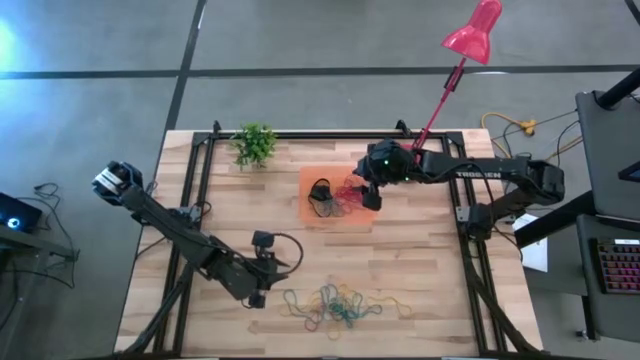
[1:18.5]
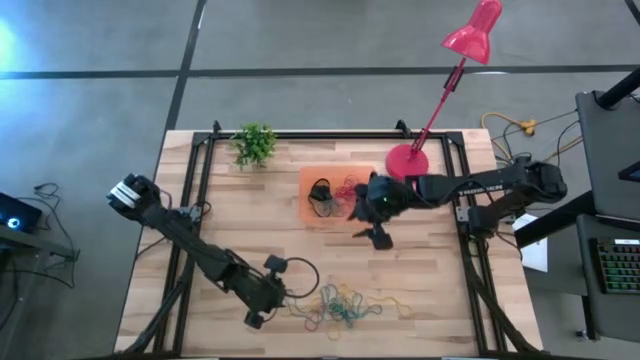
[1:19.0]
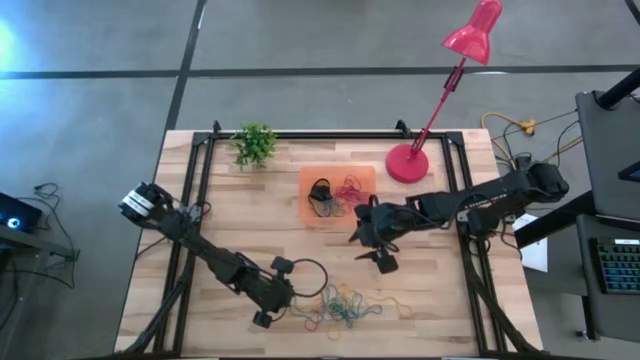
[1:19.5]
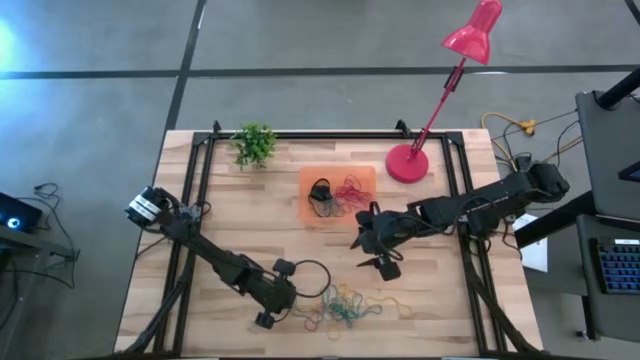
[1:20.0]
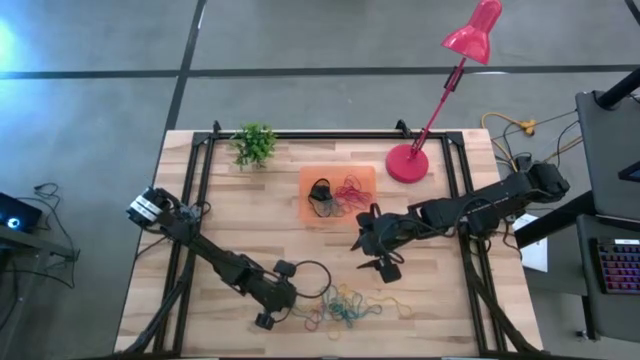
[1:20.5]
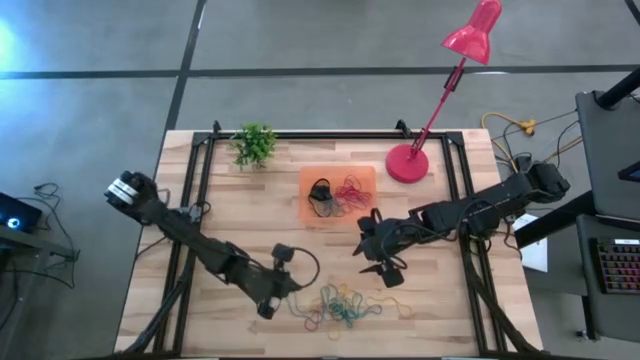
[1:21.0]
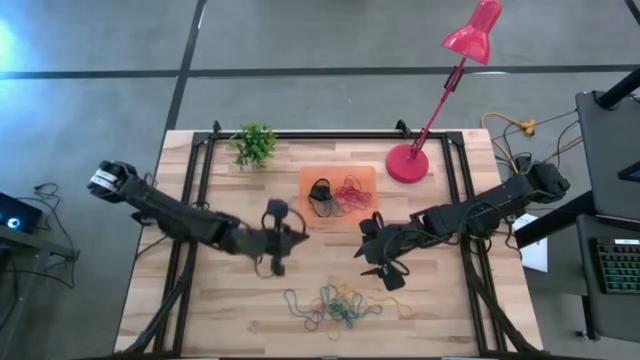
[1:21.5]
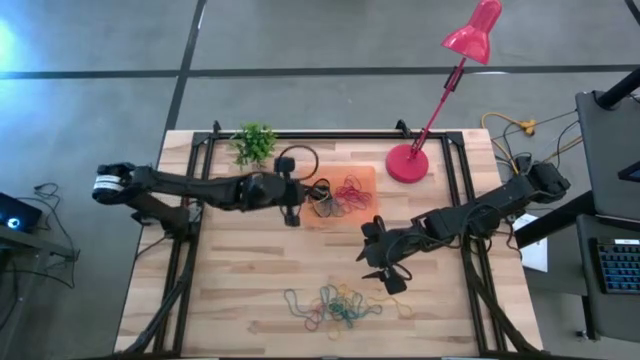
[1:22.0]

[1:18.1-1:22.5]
Task: Pick and place rubber bands into bin
Put the yellow rubber band into the bin

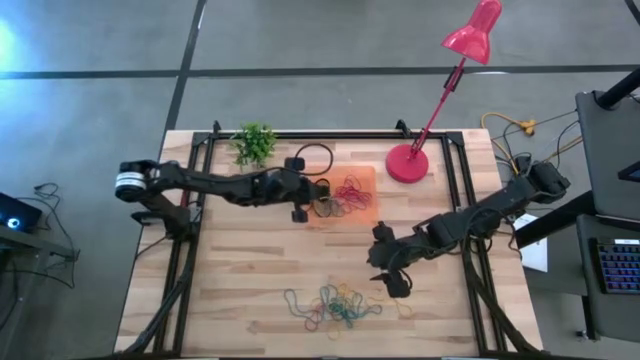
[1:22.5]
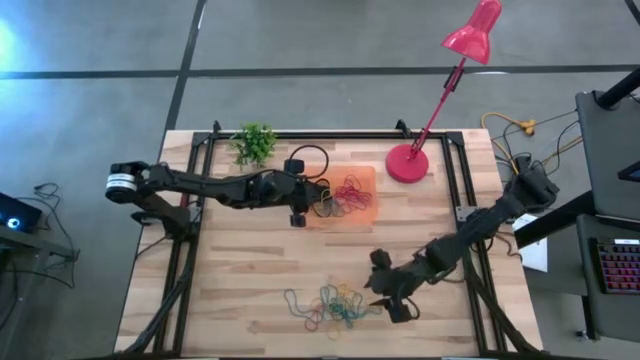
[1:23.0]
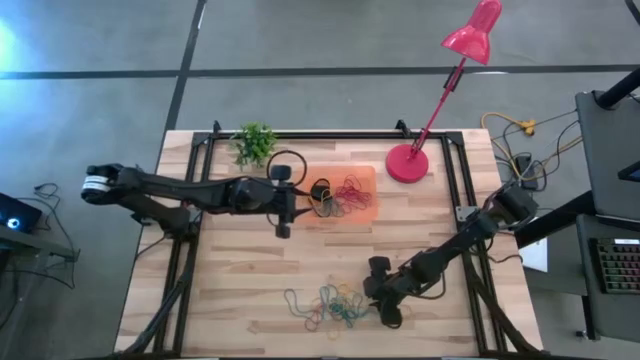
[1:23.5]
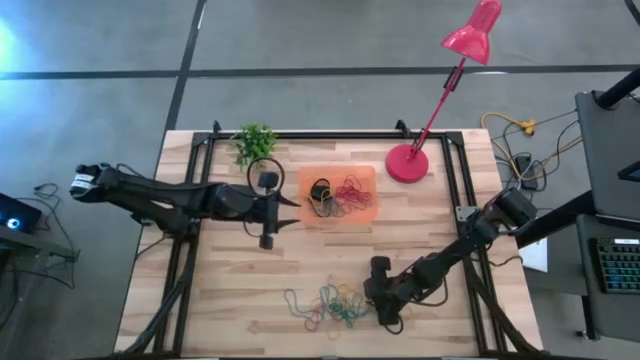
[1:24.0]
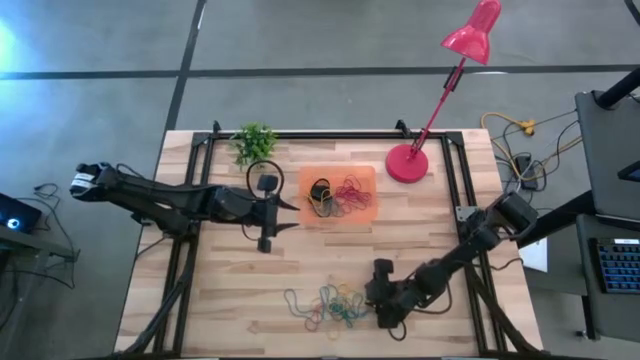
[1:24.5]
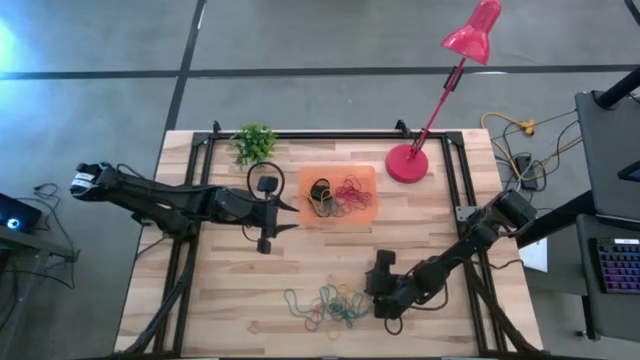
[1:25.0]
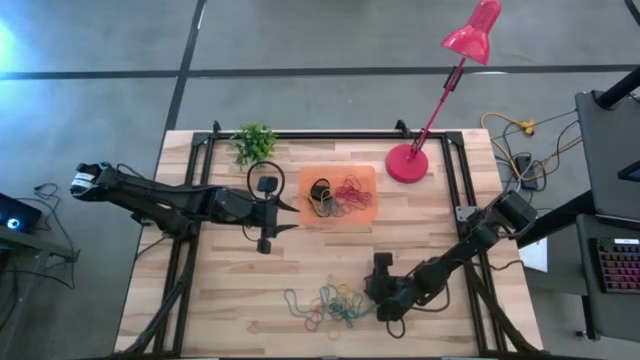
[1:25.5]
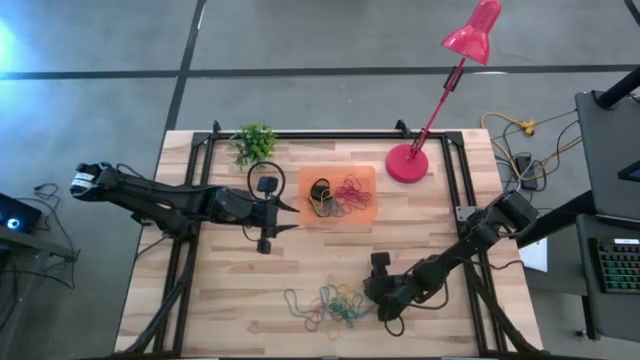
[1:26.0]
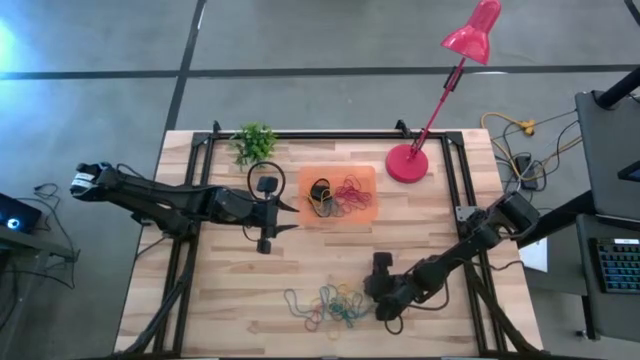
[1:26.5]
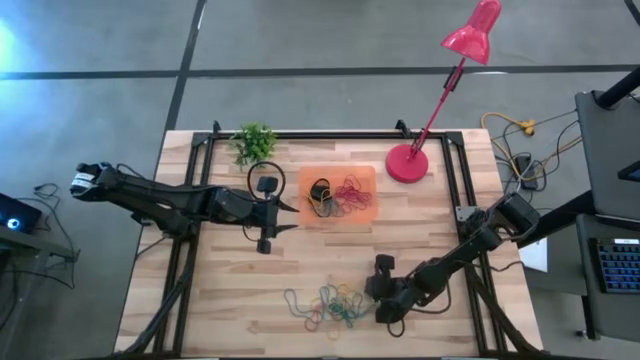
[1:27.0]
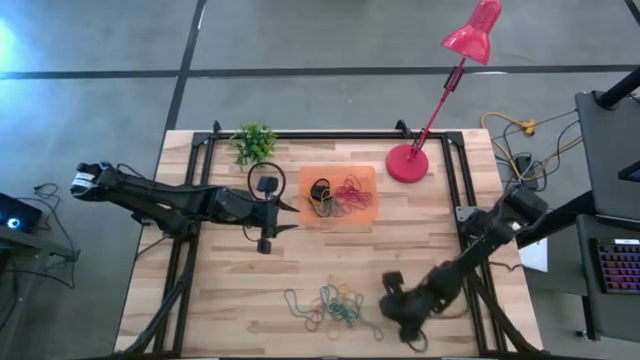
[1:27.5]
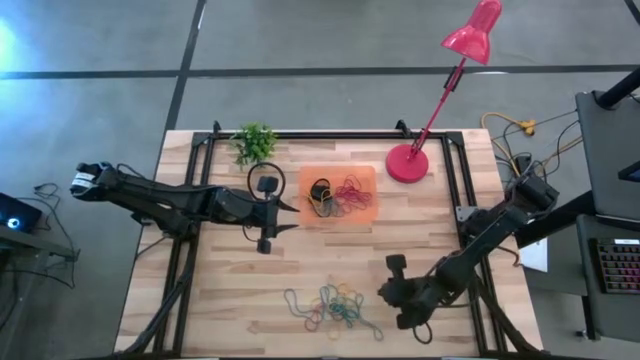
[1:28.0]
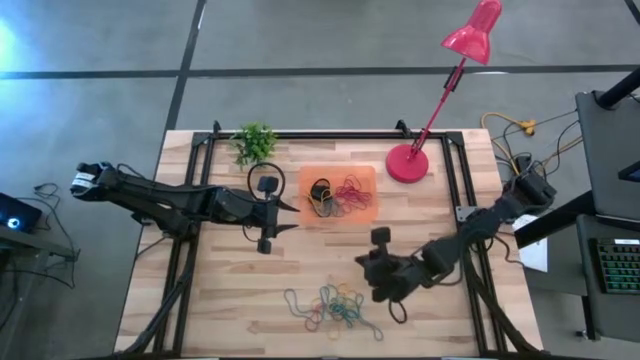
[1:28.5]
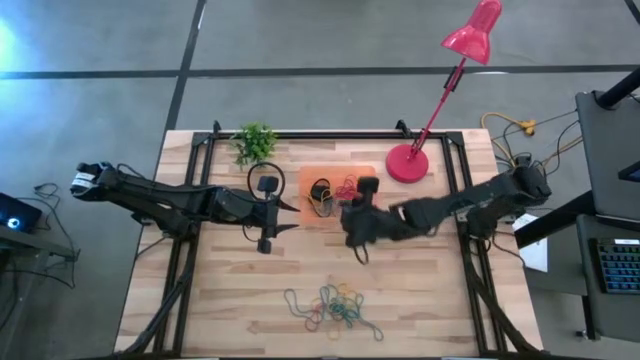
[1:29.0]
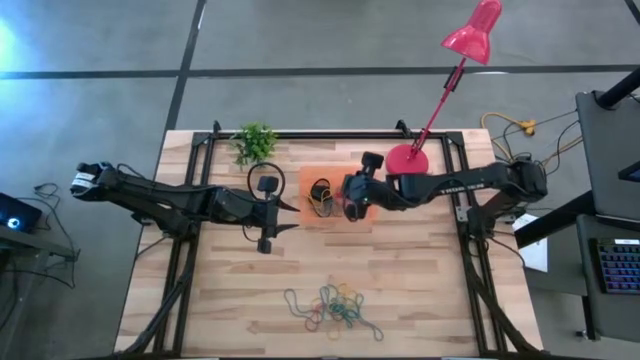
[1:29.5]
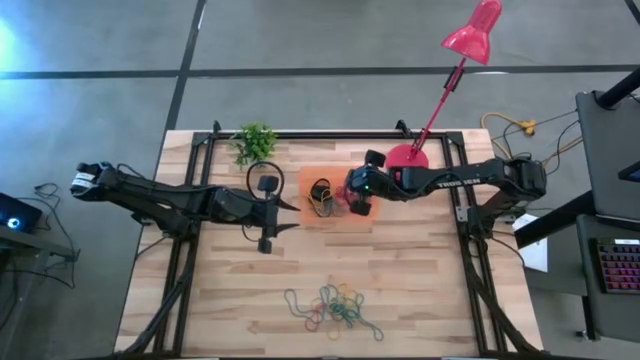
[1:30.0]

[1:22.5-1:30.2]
Put the yellow rubber band into the bin

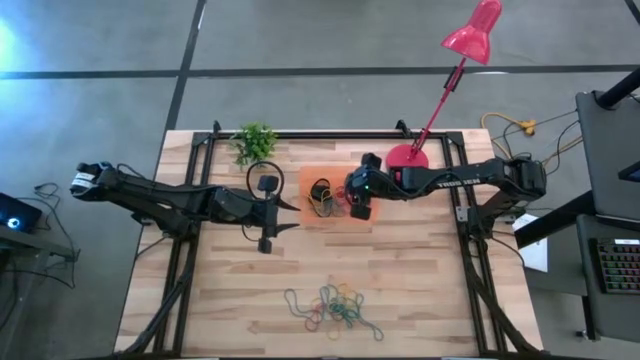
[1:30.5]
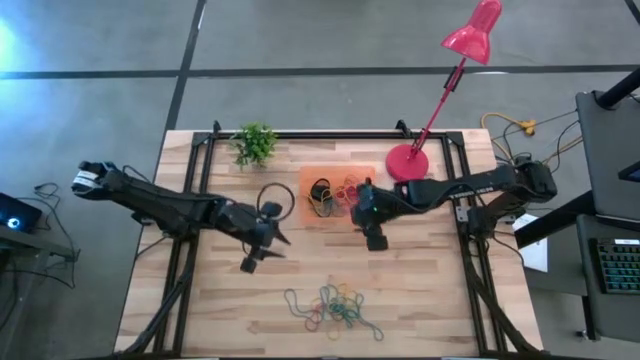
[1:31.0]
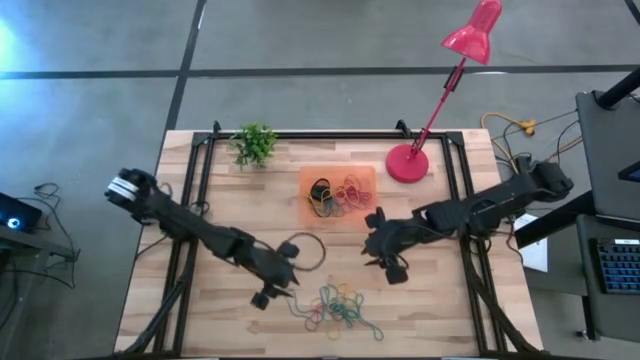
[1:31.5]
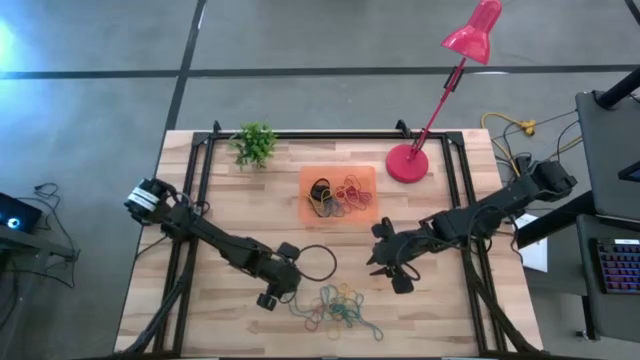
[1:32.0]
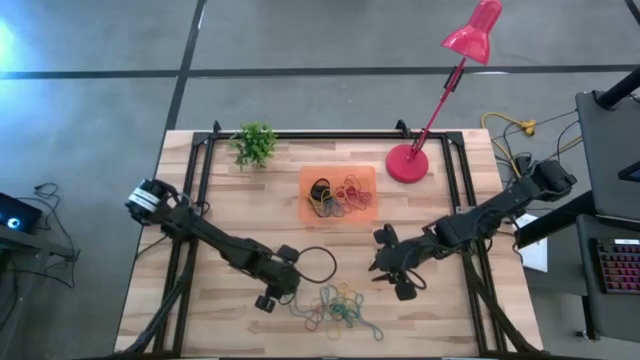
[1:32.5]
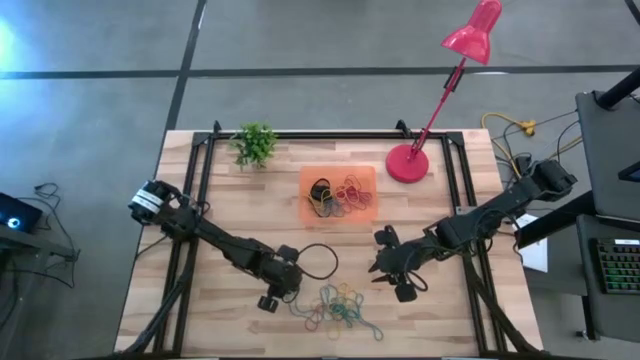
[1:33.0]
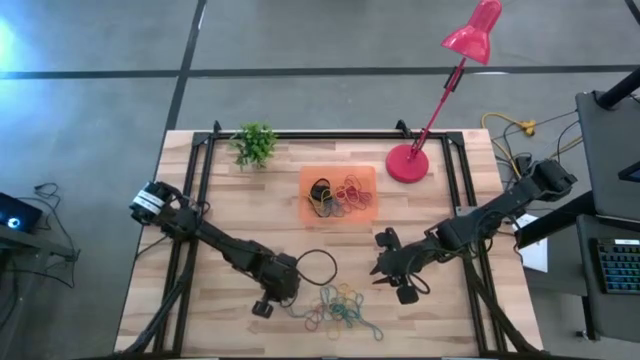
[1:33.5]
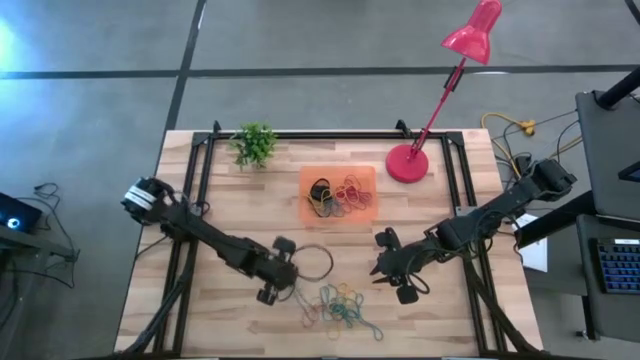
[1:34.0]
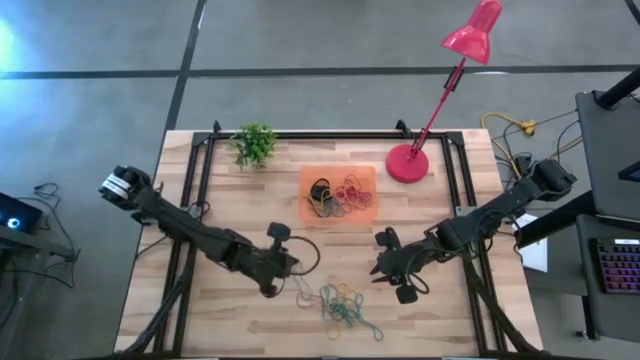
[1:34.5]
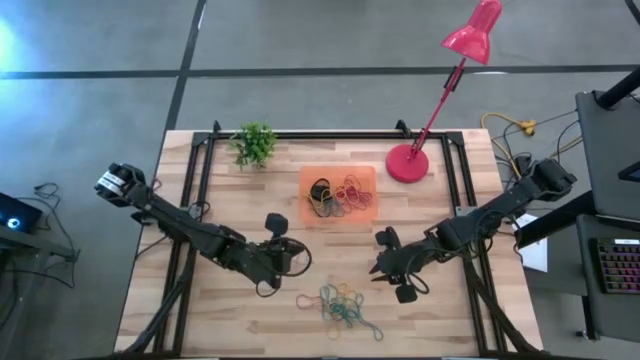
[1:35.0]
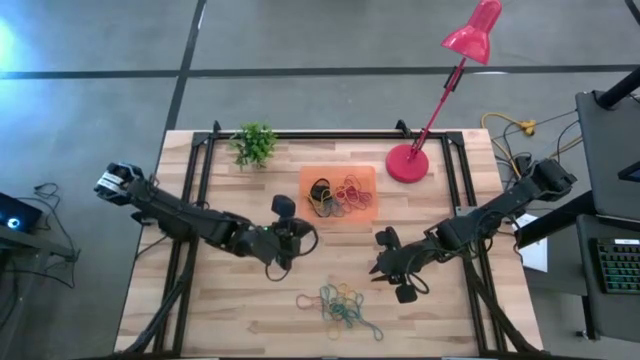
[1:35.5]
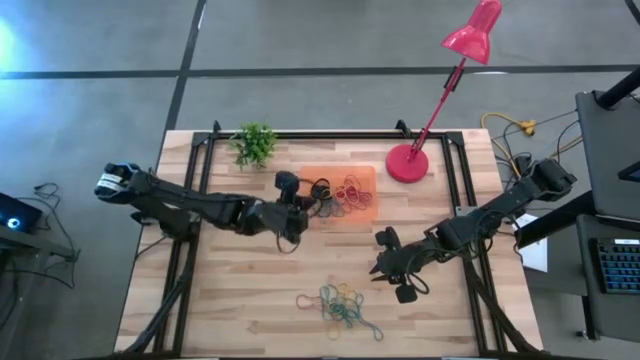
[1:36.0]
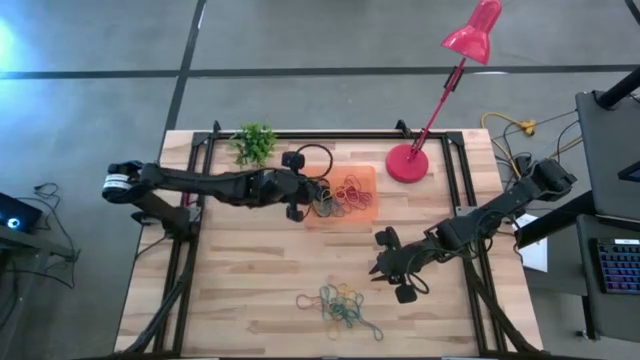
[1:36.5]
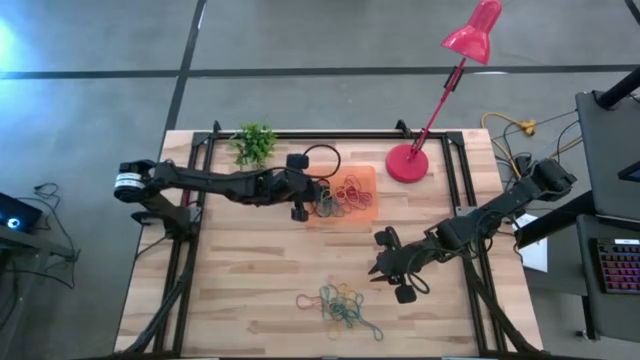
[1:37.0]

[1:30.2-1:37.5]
Put the blue rubber band into the bin

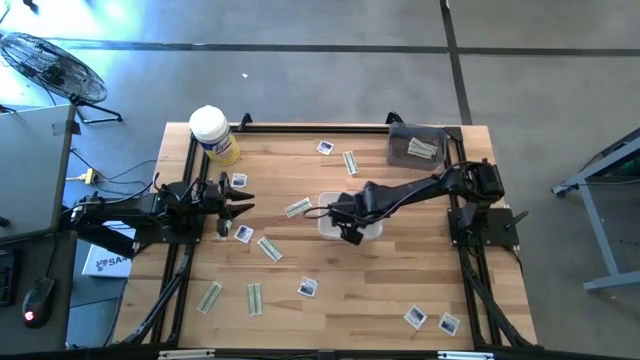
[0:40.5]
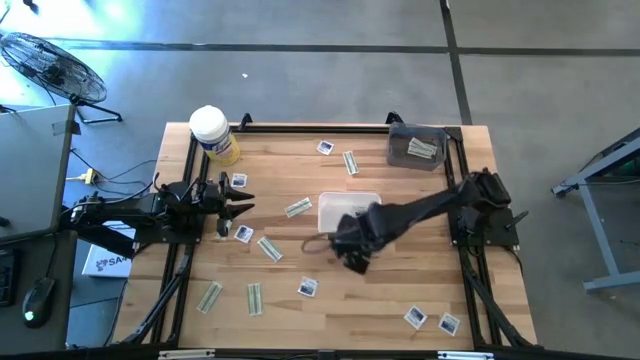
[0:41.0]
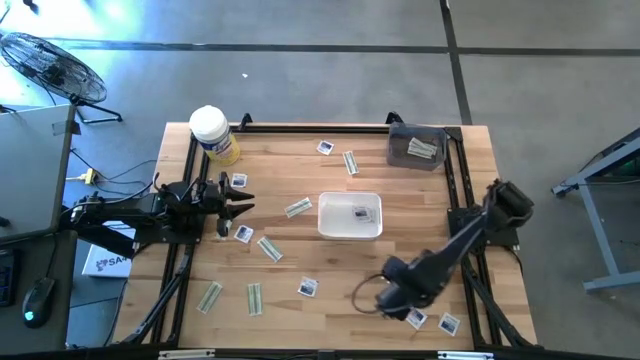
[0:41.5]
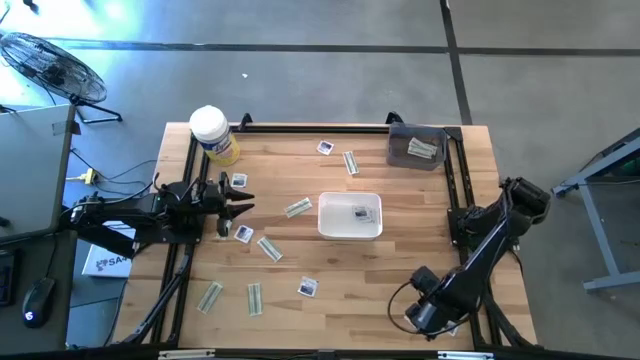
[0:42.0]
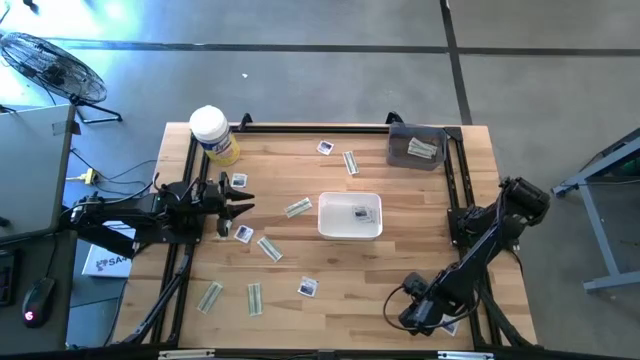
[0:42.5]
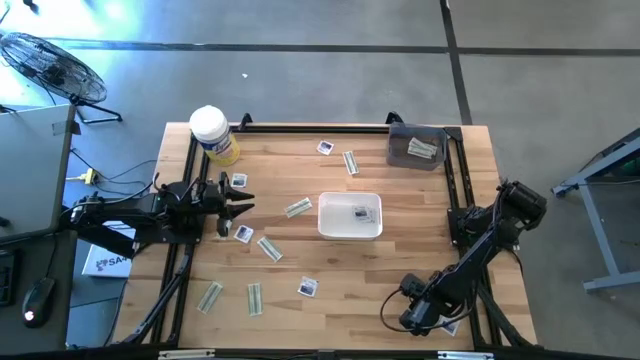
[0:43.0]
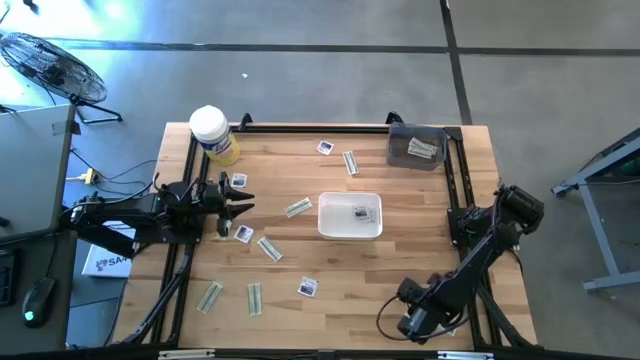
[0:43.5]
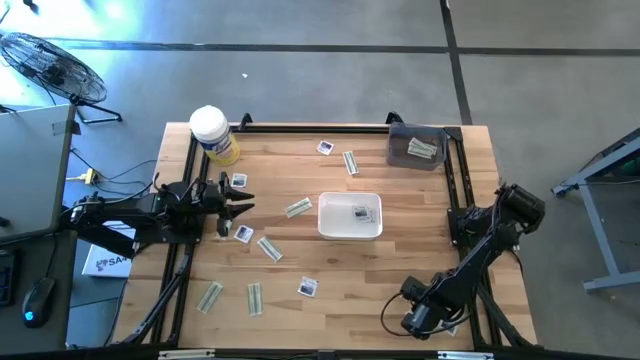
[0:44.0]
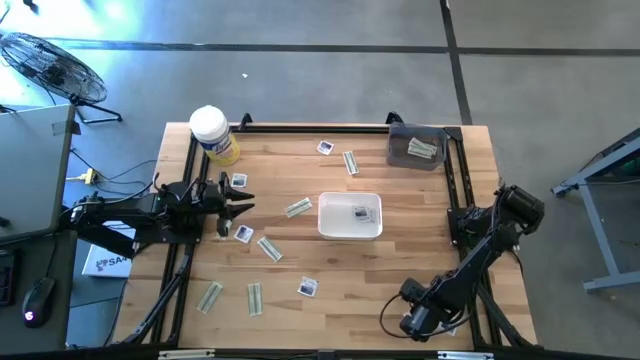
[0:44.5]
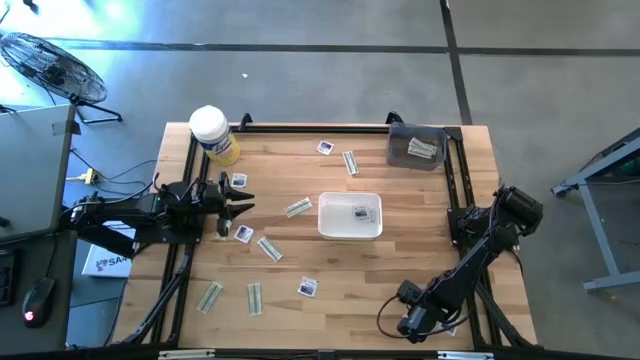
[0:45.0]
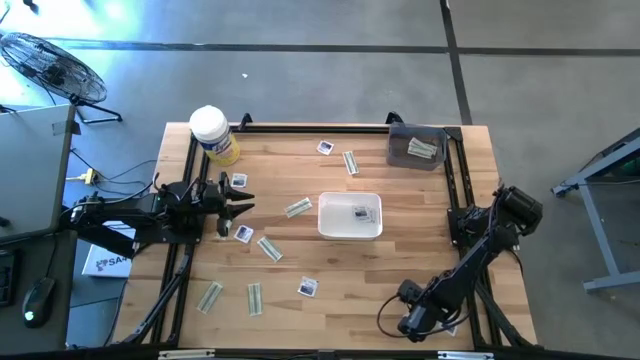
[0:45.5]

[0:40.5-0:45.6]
Task: Pick & Place First Aid Supplies
Put the blue alcohol pad into the white bin
